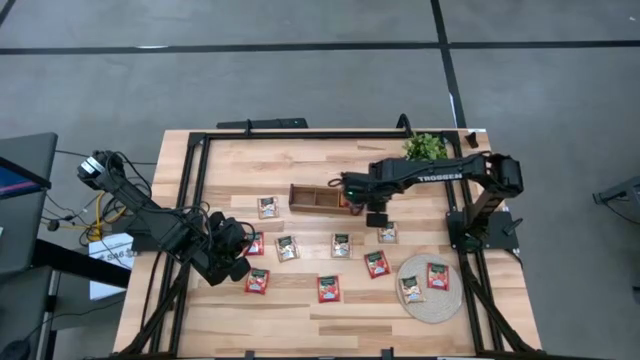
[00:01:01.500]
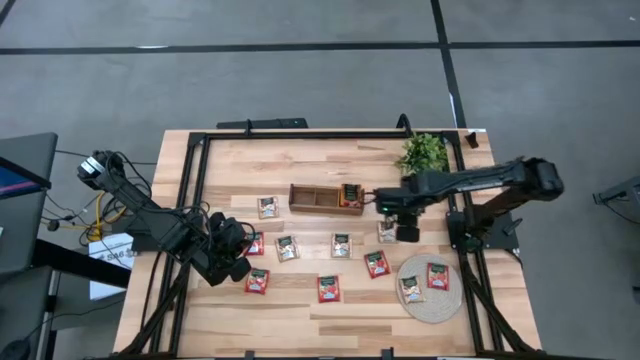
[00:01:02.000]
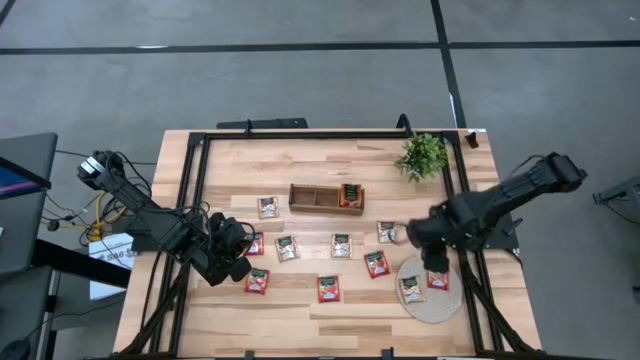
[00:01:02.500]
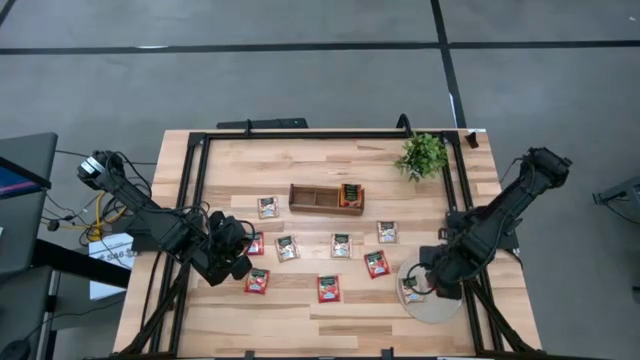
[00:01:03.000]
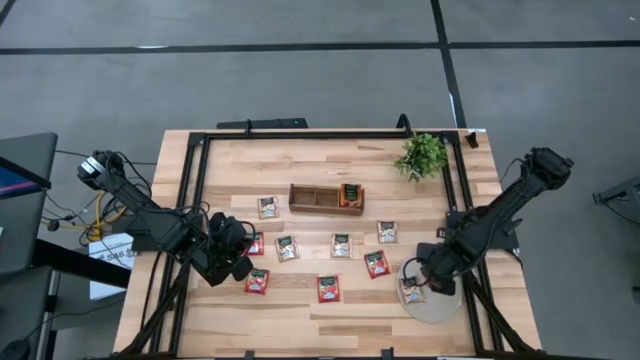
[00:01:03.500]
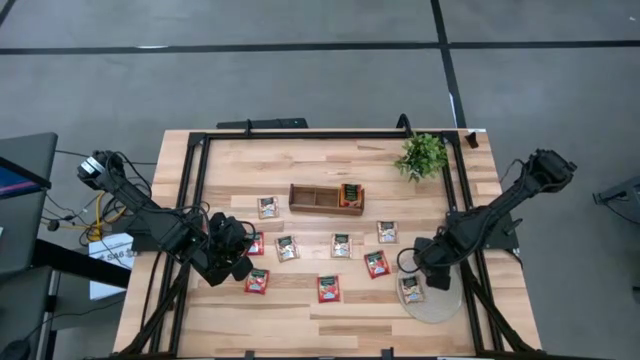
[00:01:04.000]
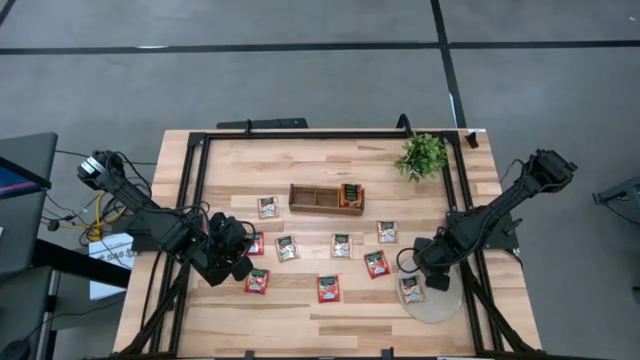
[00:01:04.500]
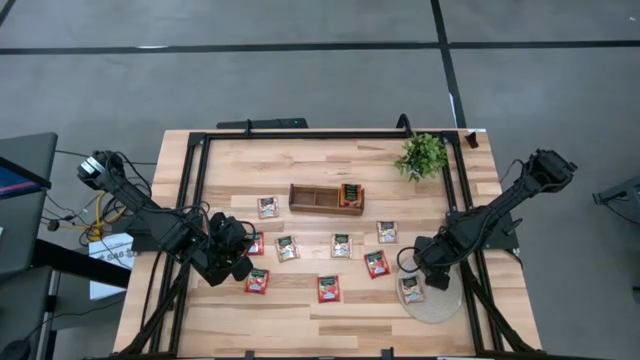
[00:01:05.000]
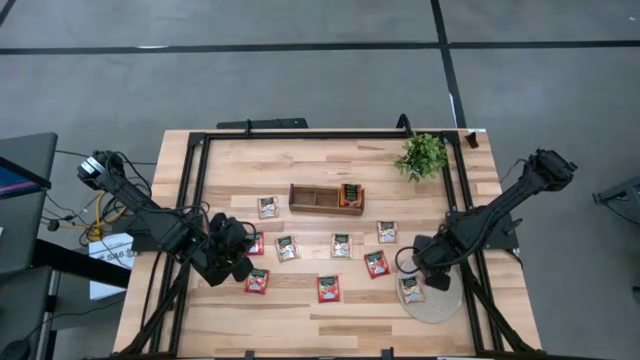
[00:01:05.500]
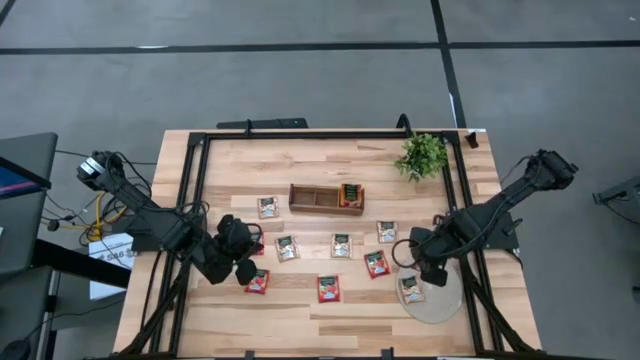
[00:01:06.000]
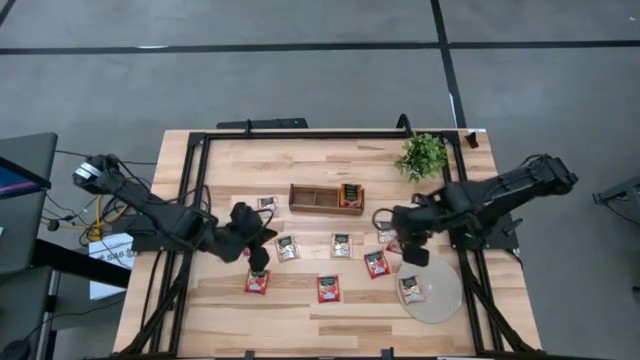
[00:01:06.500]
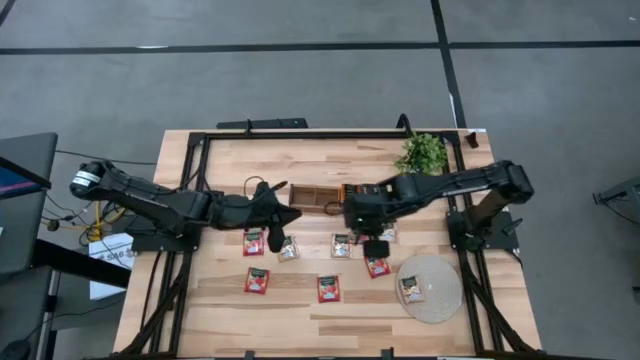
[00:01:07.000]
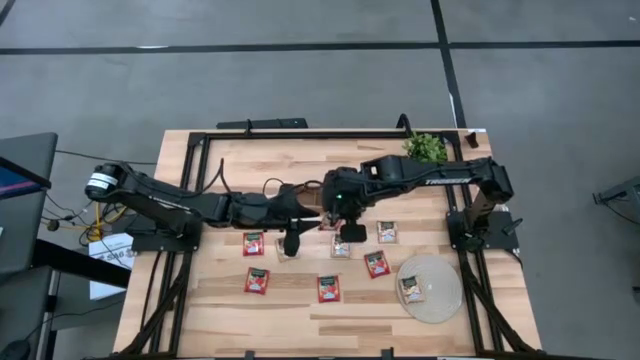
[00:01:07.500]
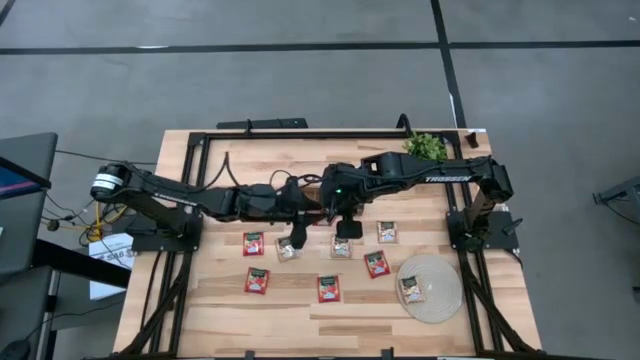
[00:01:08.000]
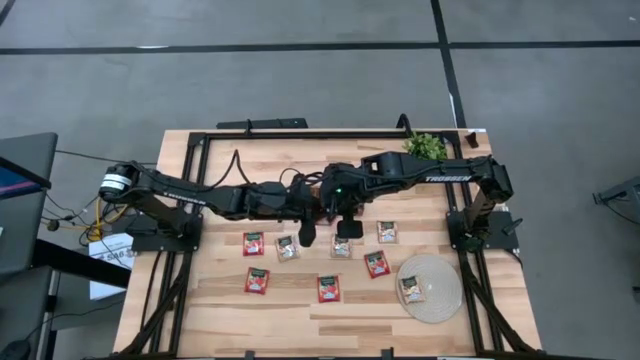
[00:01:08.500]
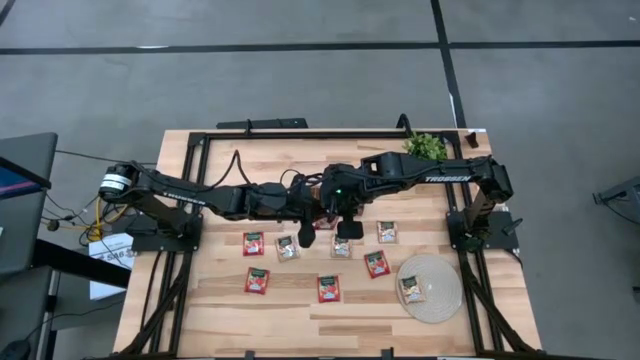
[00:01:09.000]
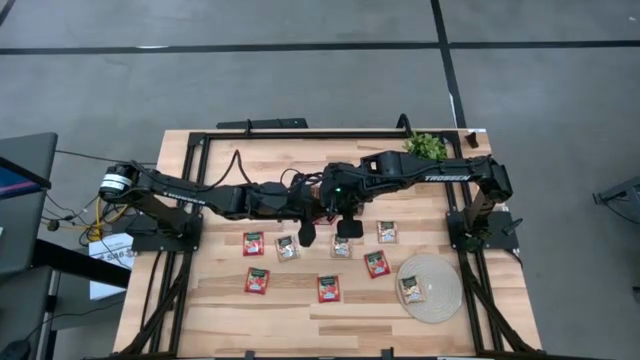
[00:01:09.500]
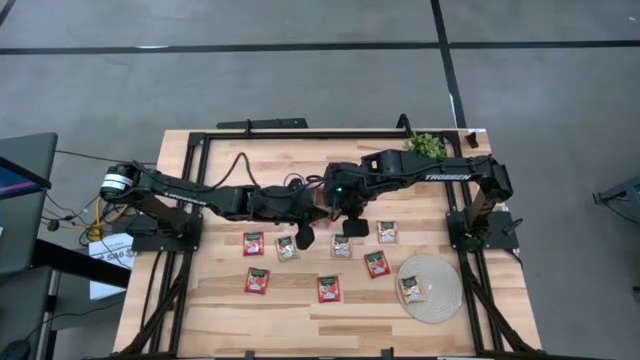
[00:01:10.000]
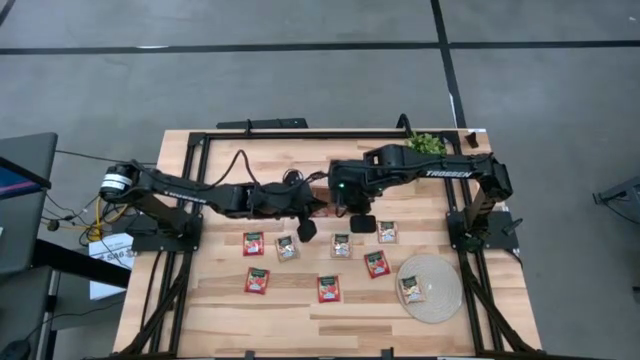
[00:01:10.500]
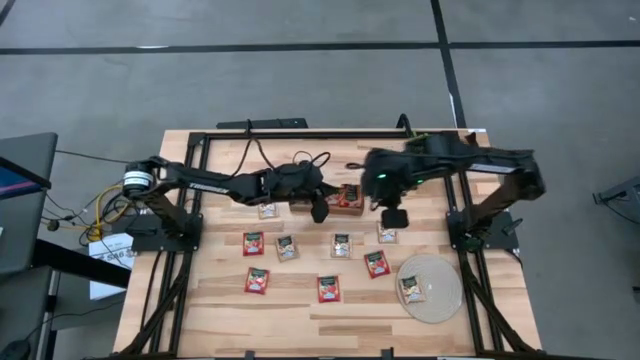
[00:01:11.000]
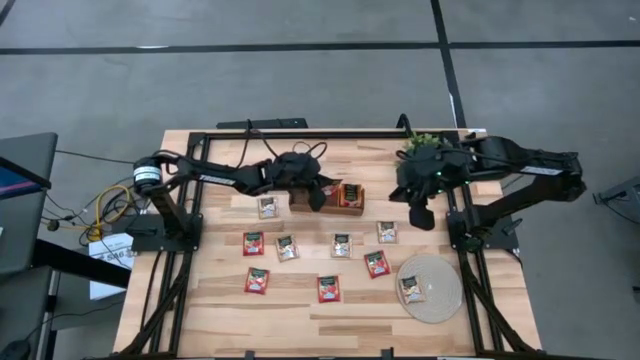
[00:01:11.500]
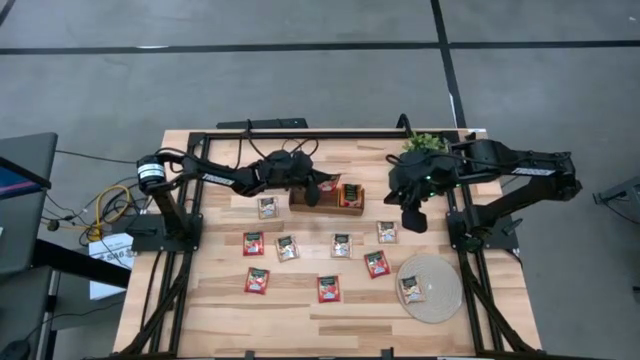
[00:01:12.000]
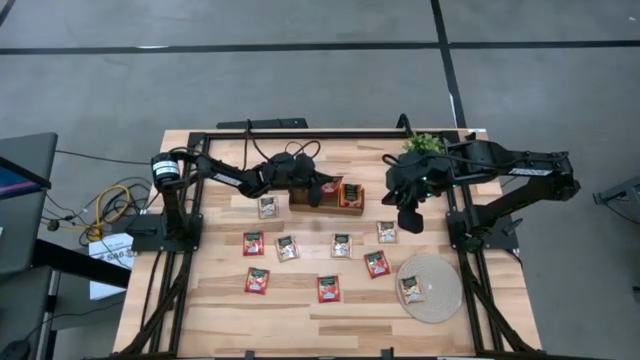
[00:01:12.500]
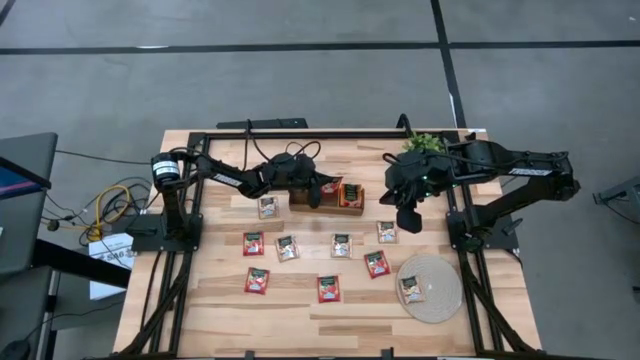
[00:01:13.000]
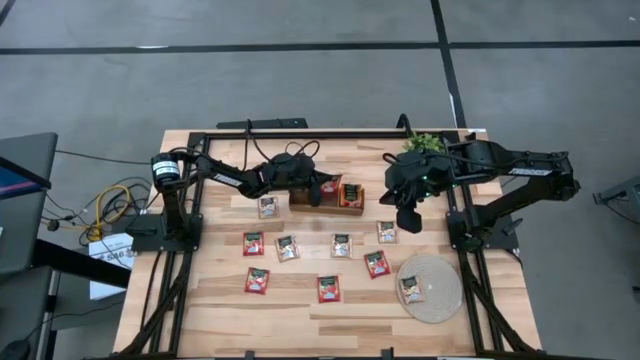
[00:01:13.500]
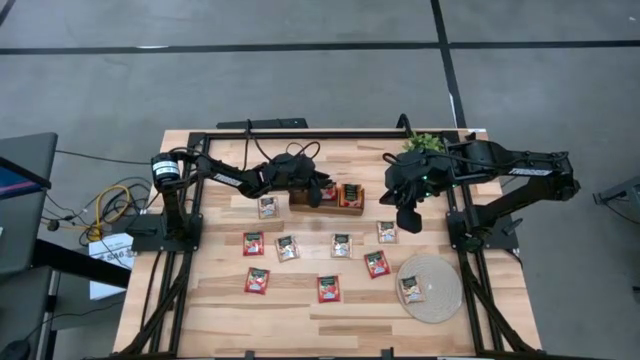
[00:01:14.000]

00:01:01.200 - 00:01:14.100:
Task: Pick & Place Tea
Put the red tea bag into the middle section of the wooden organizer

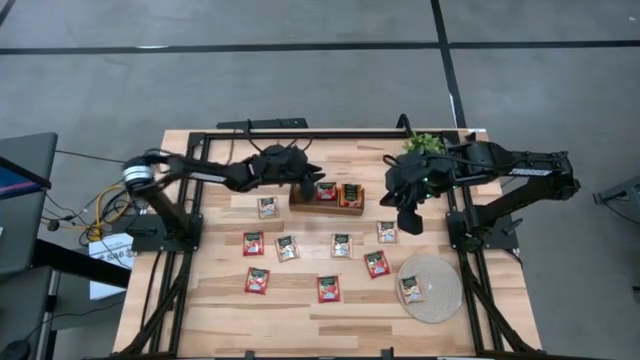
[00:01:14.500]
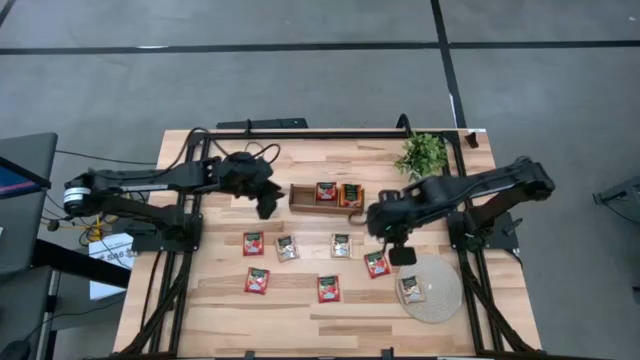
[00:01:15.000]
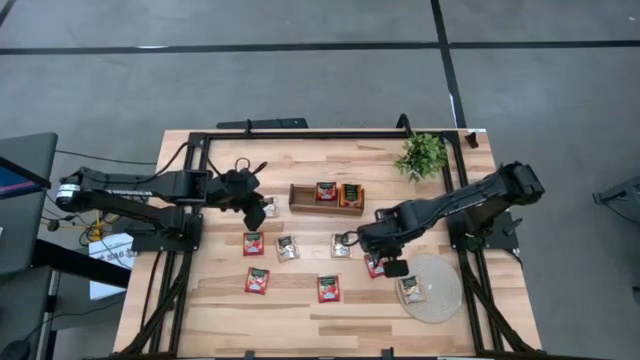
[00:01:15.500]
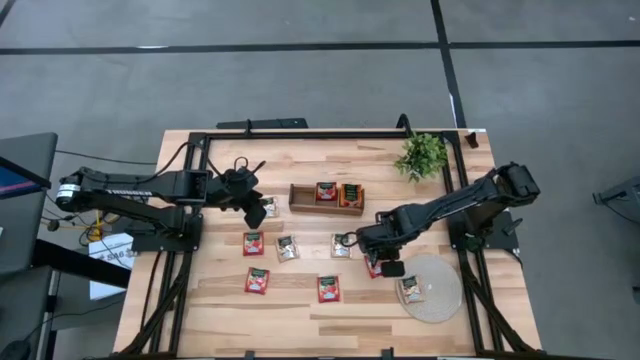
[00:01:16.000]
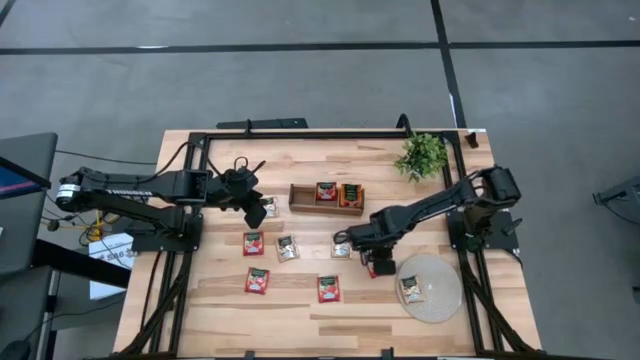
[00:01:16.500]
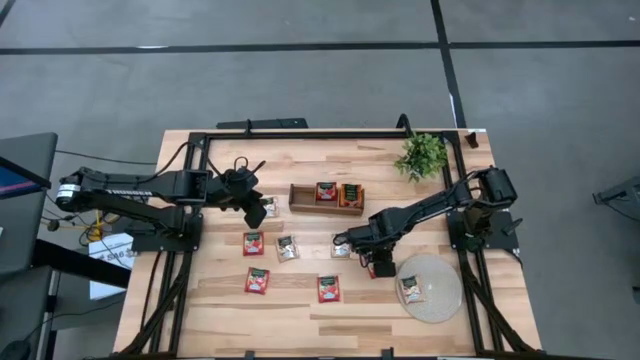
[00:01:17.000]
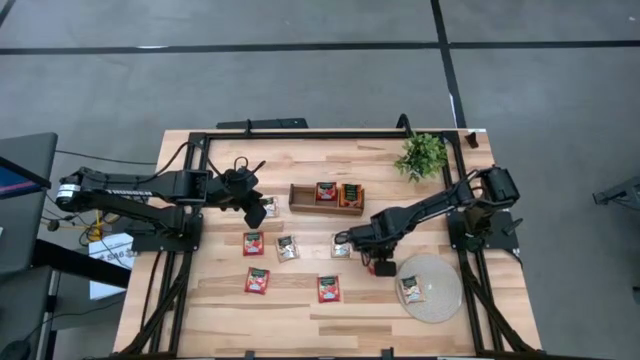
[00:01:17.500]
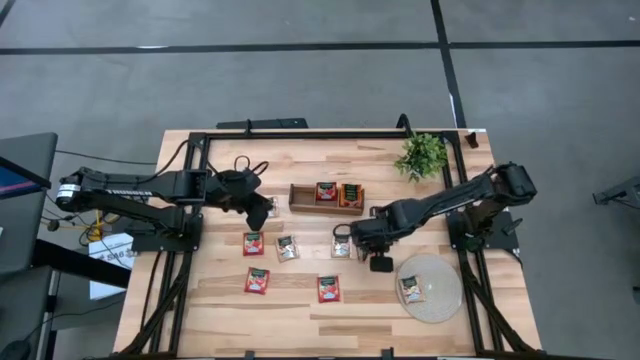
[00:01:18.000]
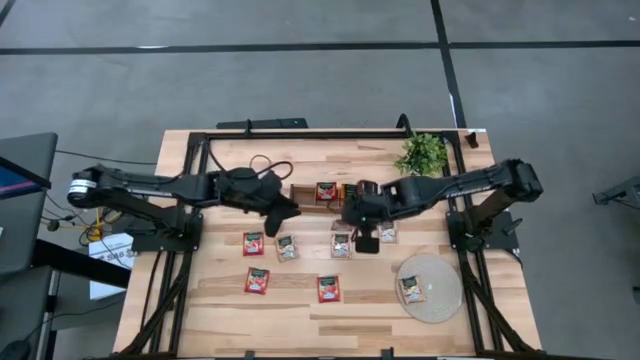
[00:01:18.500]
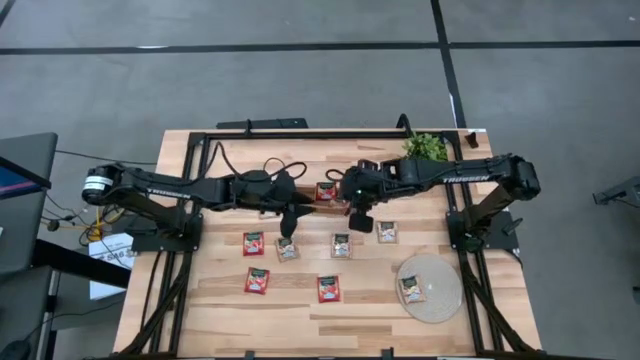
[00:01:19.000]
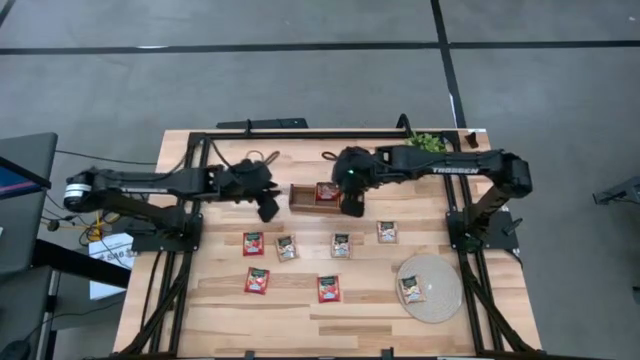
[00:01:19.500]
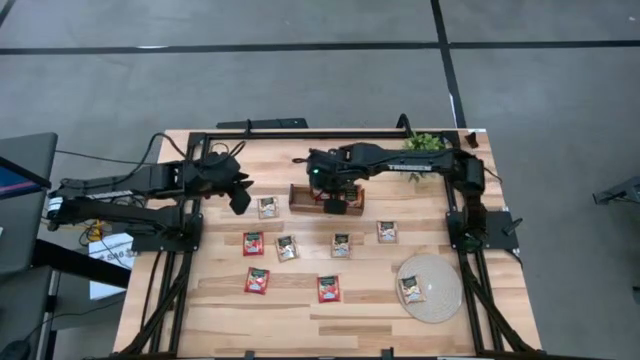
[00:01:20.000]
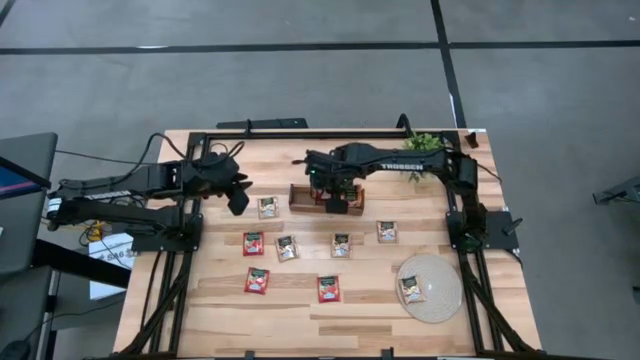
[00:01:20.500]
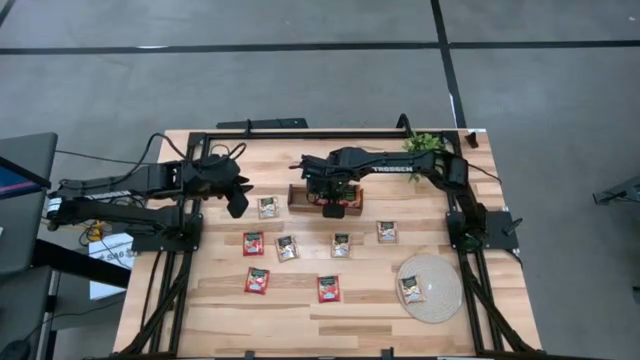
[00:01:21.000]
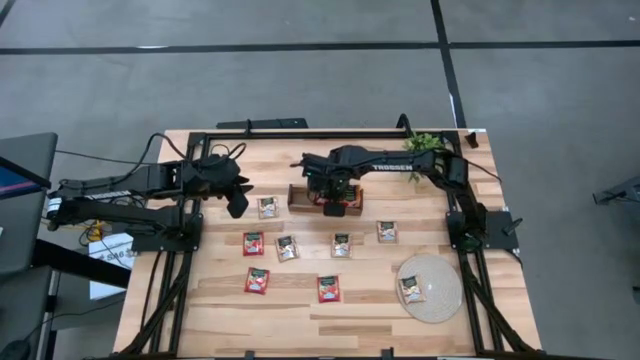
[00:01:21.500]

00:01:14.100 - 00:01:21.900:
Put the red tea bag into the middle section of the wooden organizer
